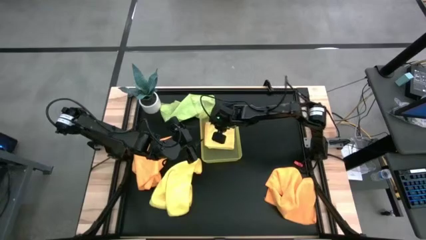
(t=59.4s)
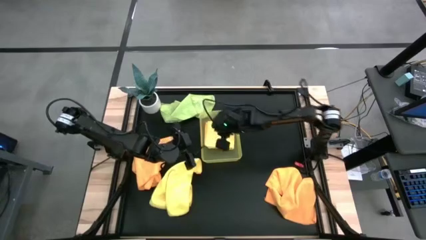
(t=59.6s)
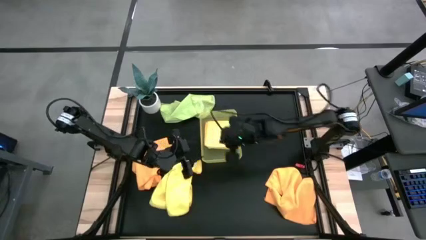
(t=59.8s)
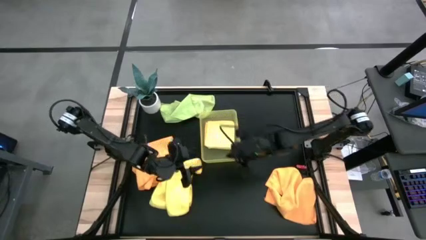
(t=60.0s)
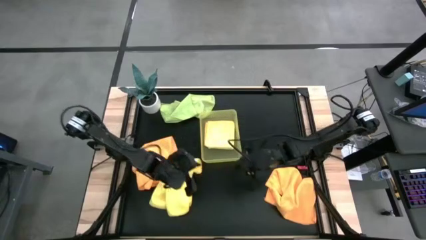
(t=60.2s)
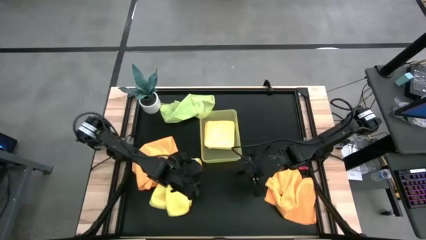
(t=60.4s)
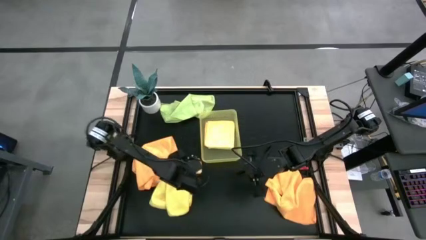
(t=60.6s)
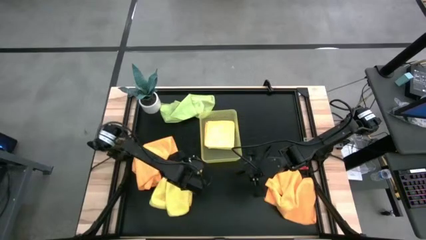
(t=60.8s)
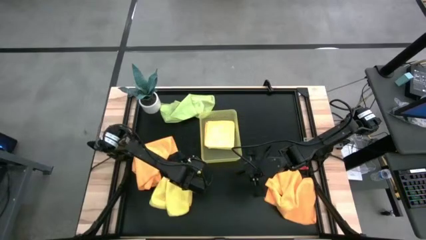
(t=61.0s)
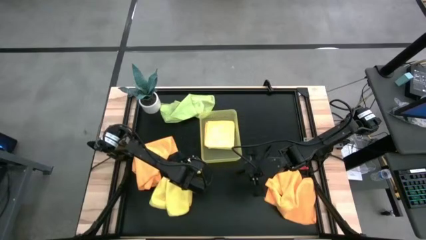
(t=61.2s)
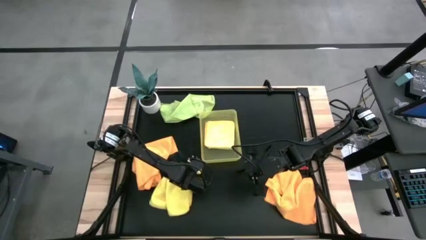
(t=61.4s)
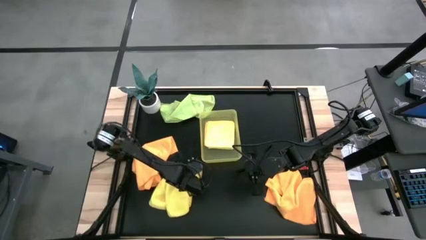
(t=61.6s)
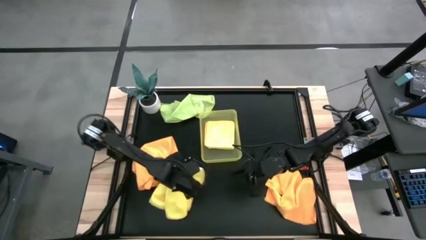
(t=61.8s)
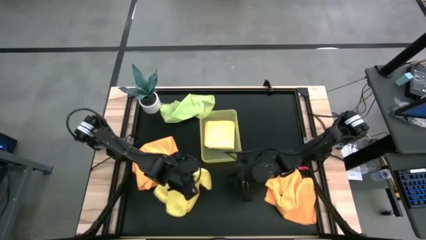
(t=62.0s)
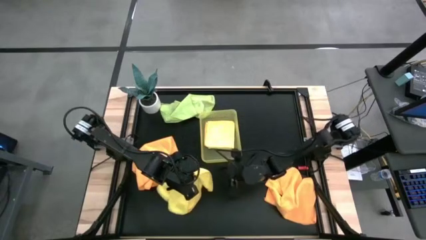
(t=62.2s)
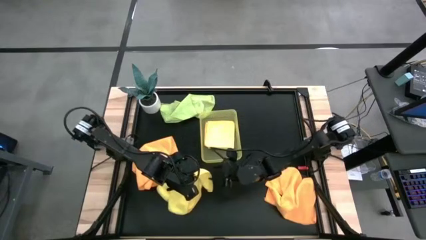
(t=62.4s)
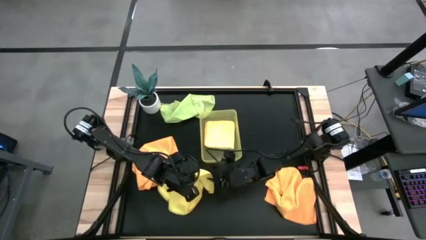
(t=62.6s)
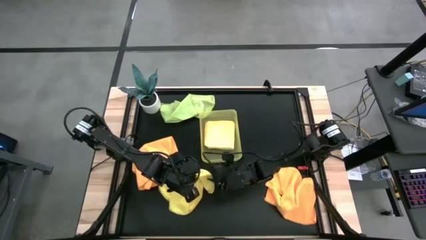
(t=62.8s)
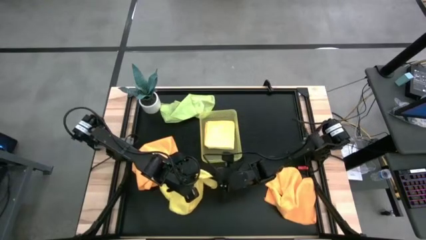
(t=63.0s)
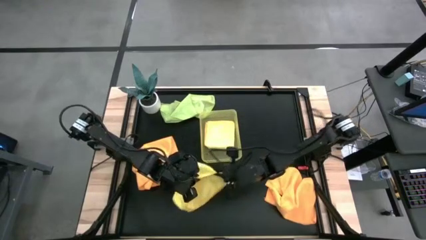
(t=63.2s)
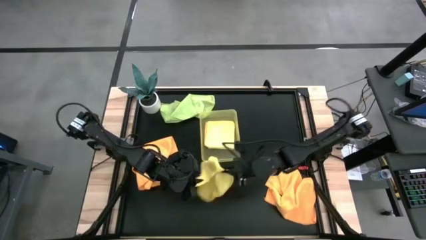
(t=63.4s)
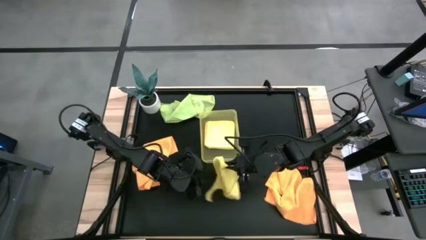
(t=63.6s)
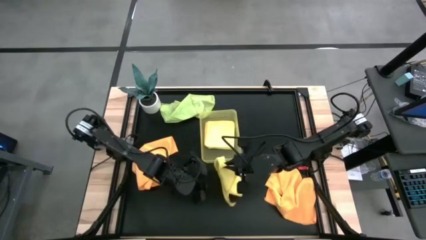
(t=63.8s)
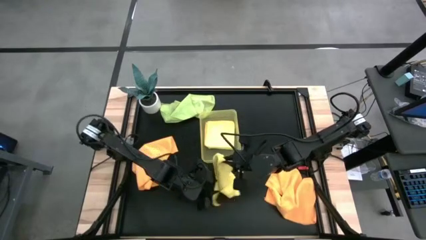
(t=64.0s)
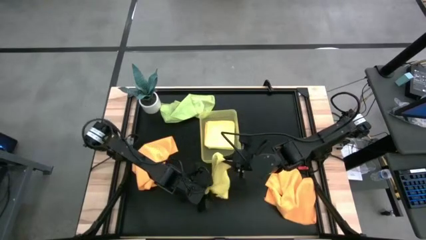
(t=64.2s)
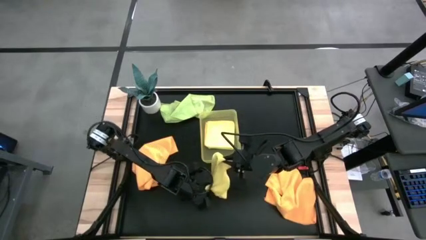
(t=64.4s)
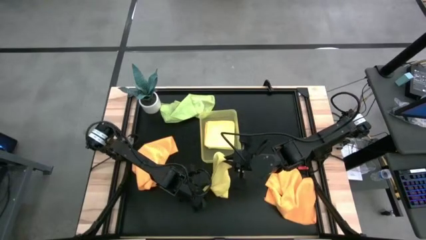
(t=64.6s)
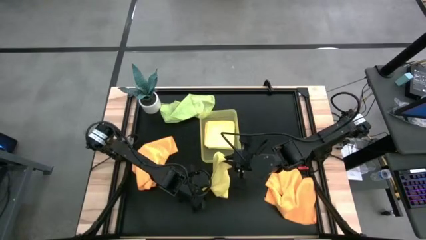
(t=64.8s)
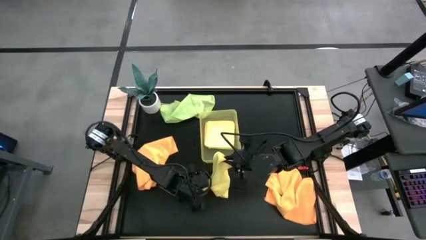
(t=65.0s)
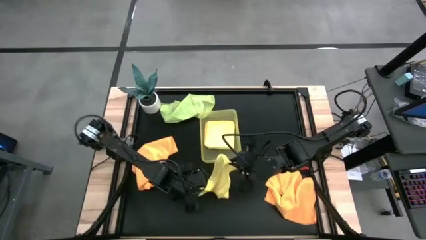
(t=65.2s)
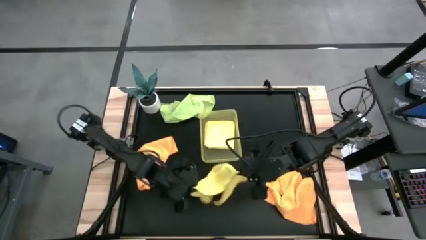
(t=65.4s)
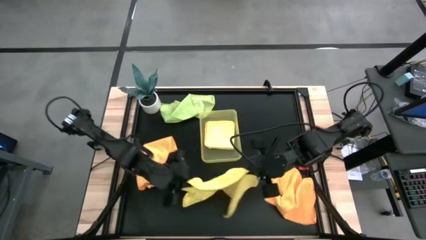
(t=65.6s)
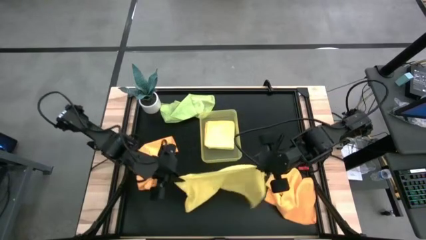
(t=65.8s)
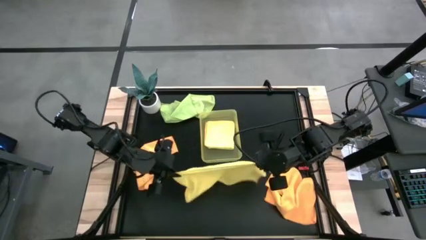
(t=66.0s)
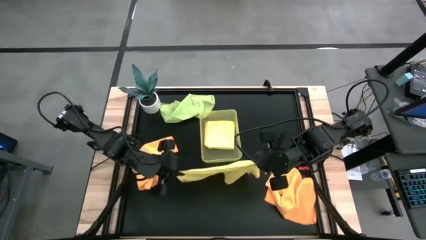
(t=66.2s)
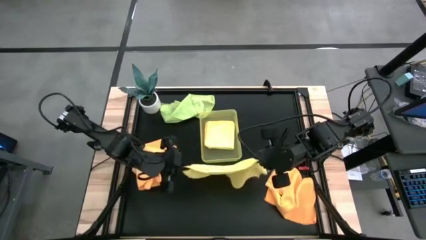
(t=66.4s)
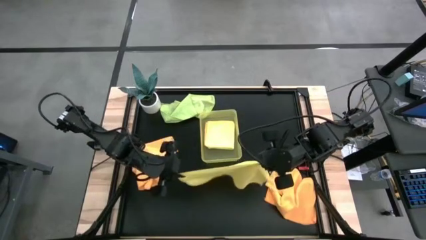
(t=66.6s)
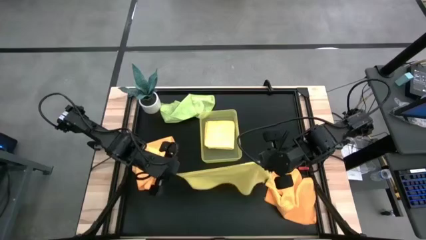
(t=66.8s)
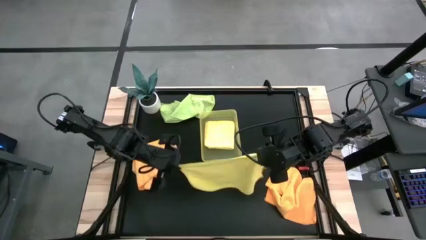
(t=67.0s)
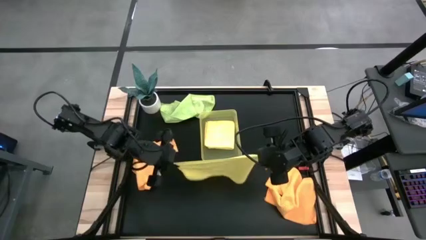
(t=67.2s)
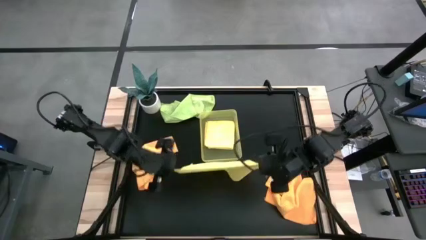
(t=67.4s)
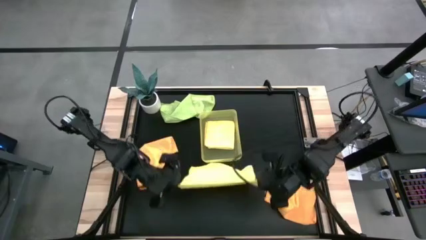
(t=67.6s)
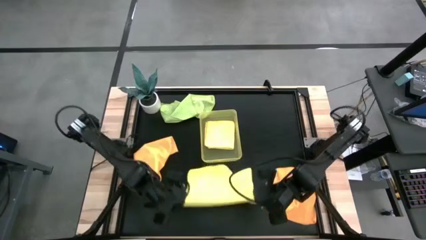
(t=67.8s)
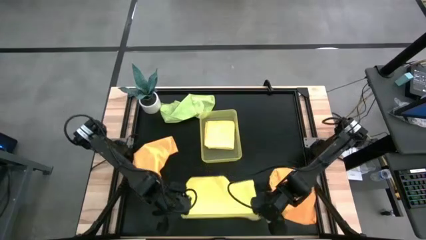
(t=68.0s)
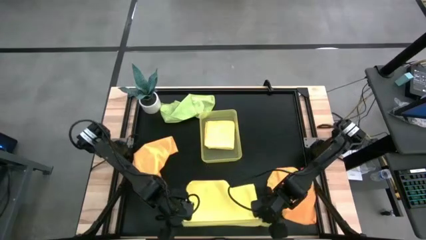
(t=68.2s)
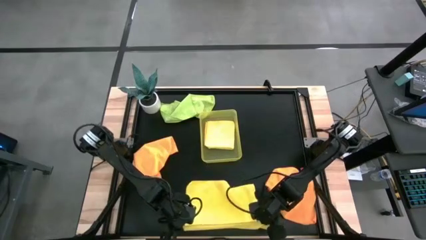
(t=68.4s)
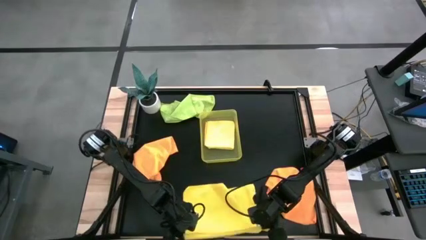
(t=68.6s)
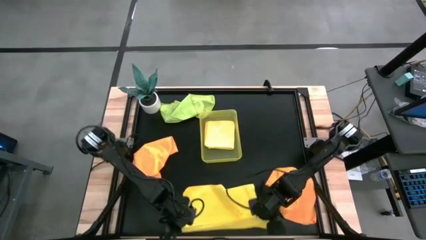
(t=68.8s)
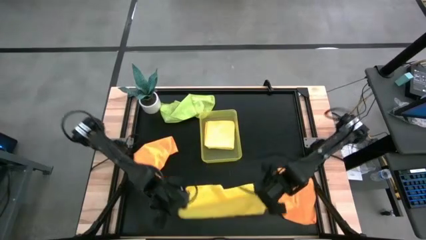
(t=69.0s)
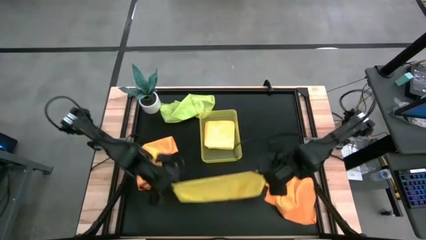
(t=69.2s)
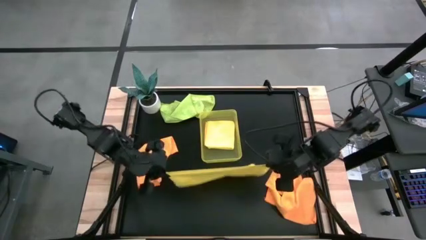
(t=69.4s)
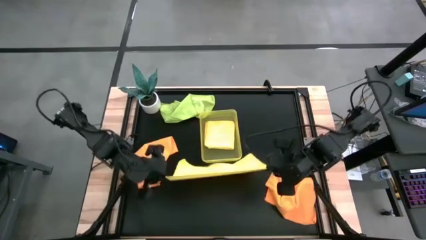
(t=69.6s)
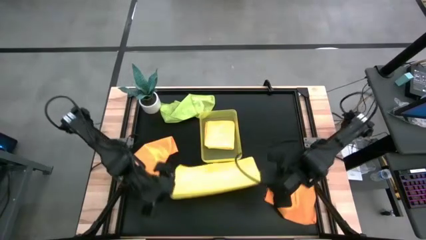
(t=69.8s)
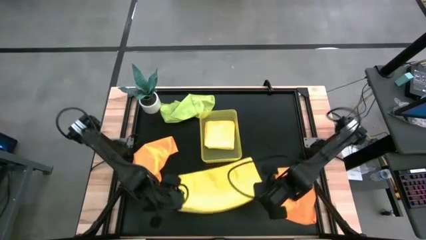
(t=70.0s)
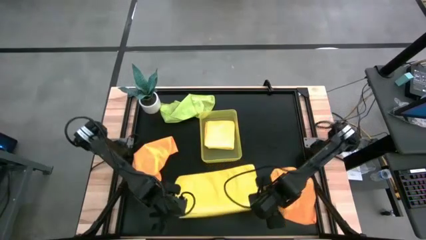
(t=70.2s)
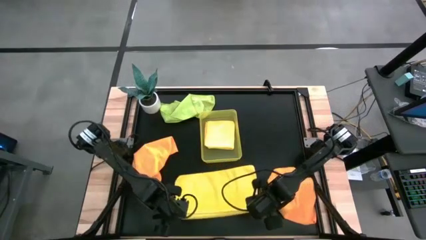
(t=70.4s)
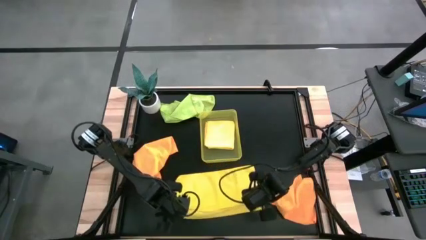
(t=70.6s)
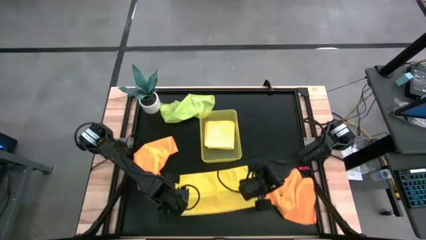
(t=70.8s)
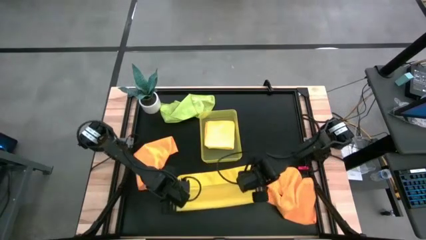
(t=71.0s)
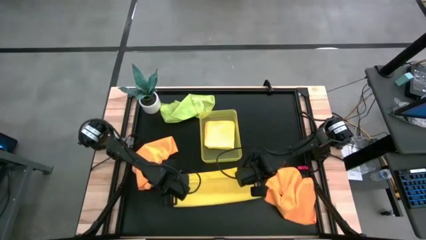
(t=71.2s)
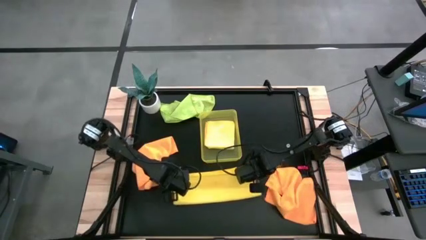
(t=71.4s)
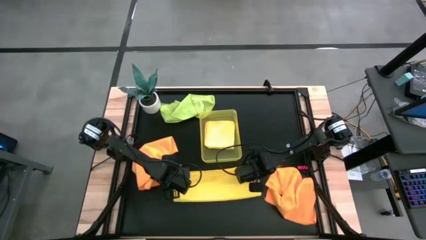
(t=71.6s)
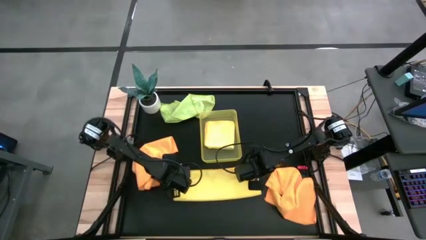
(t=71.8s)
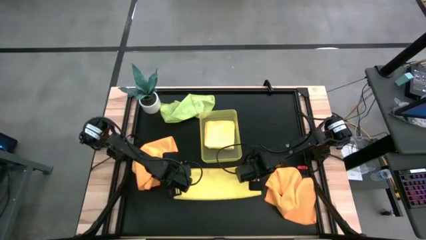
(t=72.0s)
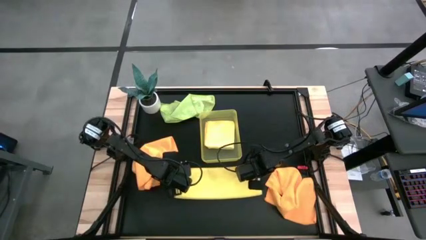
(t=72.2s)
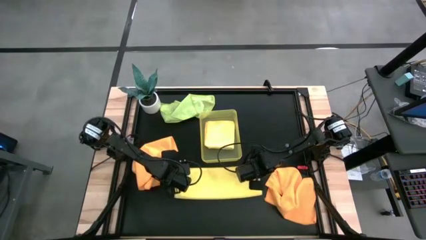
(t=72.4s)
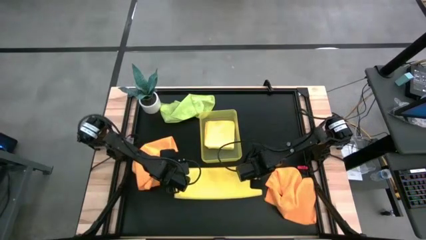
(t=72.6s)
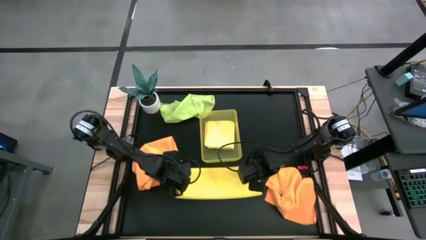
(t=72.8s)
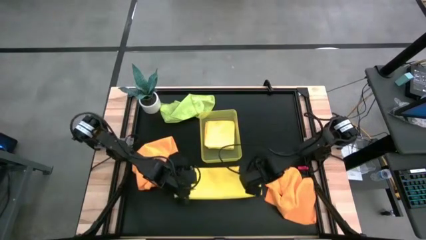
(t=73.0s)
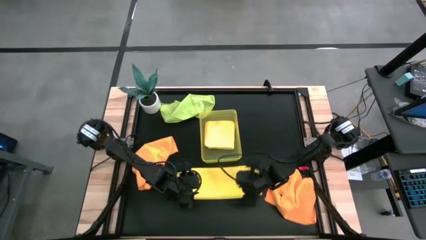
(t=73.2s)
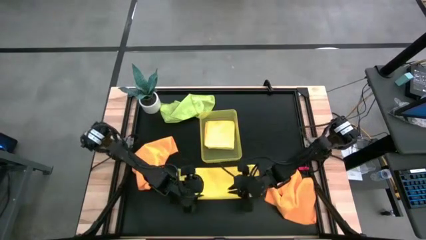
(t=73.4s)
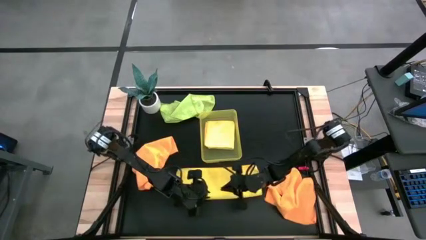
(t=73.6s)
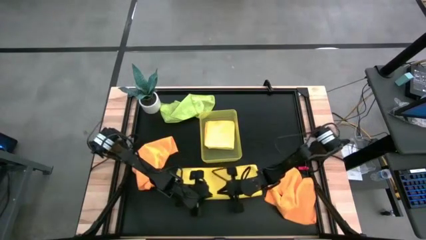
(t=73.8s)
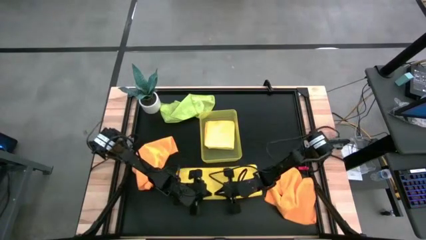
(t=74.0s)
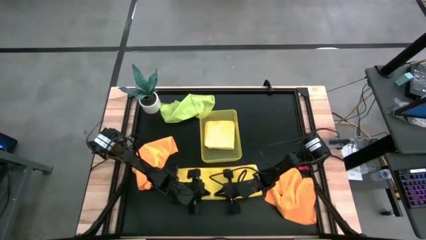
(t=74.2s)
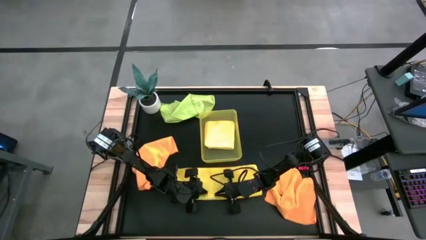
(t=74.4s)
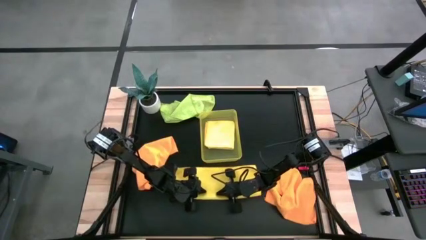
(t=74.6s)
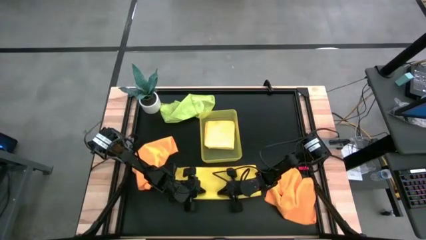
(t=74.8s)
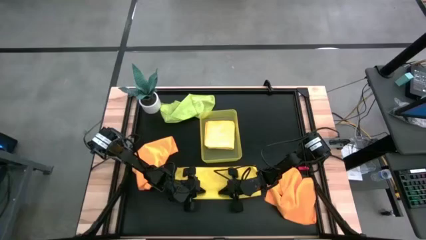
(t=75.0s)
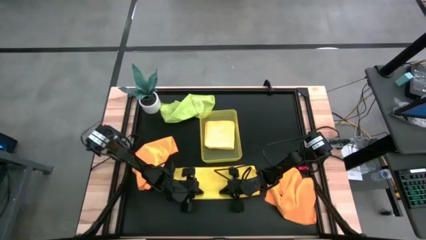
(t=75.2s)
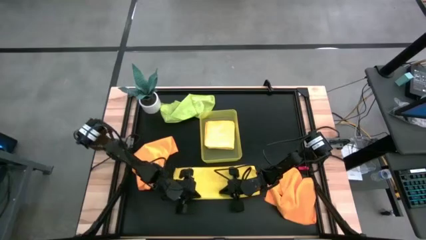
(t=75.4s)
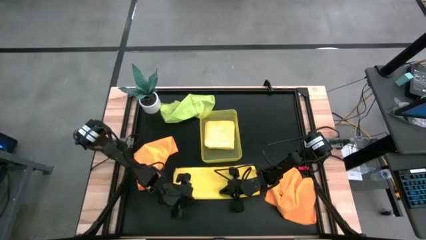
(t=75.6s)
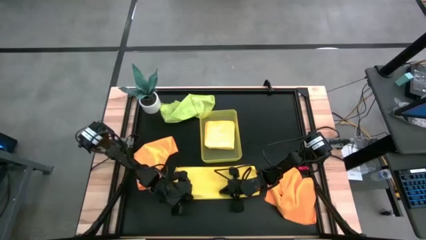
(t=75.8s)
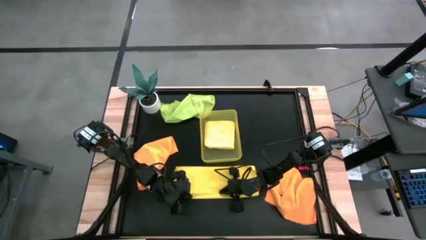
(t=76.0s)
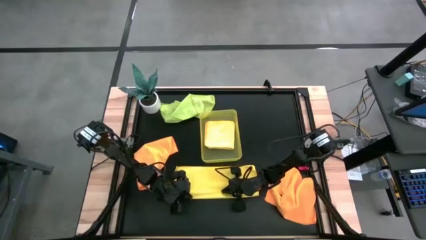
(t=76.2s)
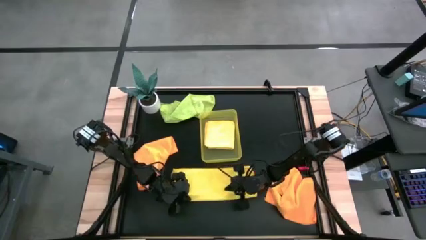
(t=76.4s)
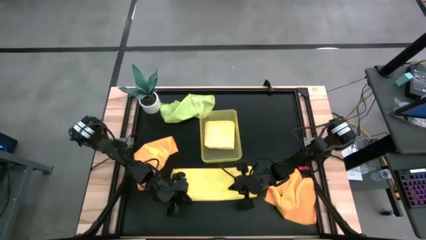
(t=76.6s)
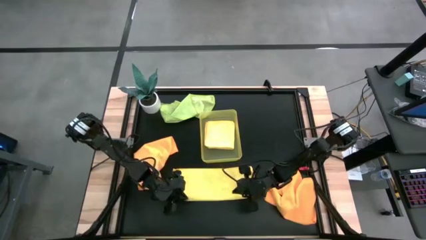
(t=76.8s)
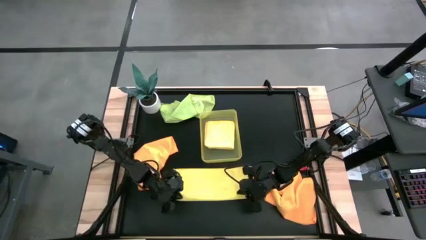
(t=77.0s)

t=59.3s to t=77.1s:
Task: Fold microfiber towels
Fold the yellow microfiber cloth
